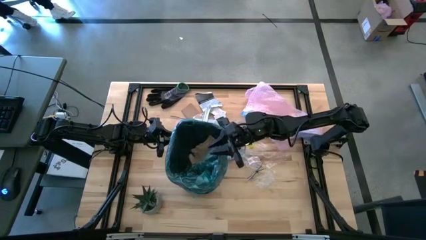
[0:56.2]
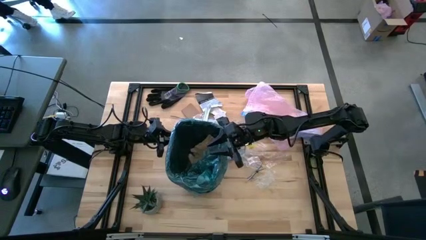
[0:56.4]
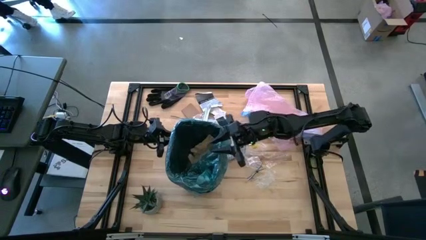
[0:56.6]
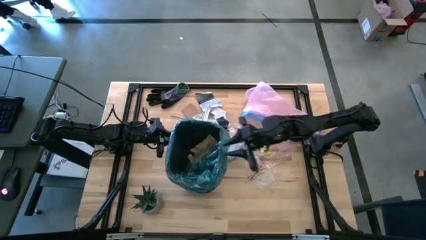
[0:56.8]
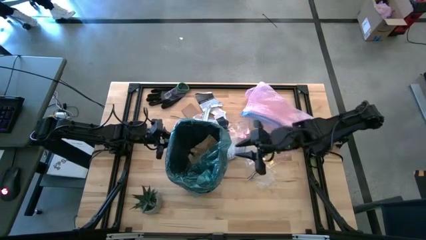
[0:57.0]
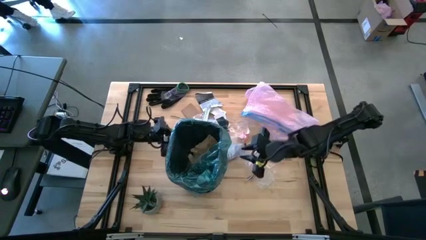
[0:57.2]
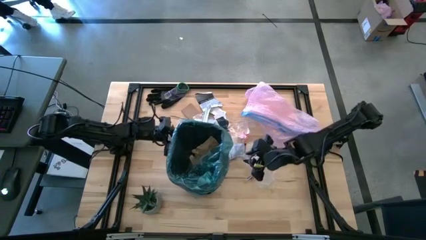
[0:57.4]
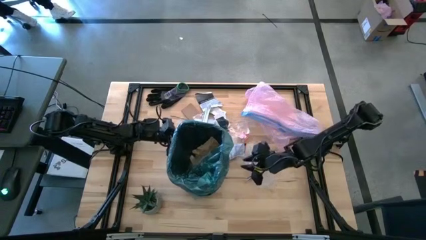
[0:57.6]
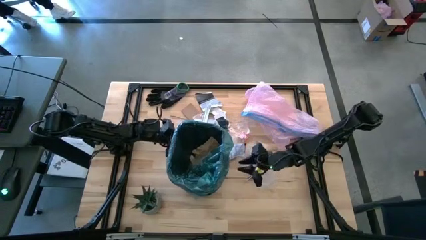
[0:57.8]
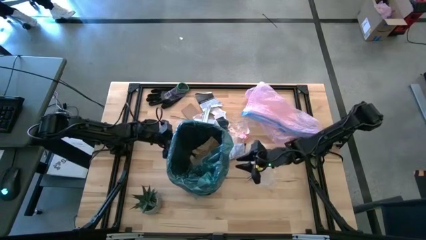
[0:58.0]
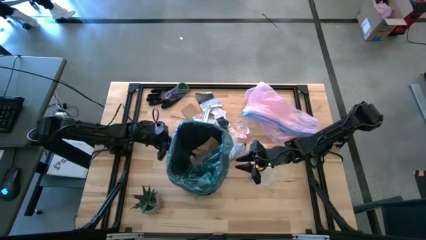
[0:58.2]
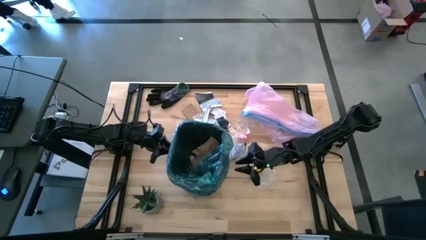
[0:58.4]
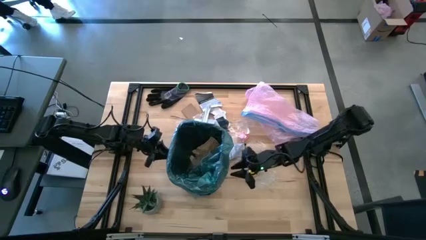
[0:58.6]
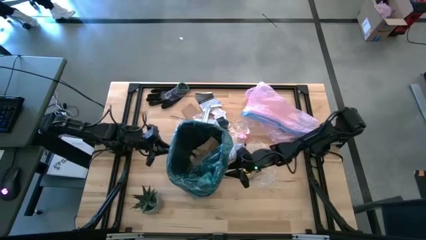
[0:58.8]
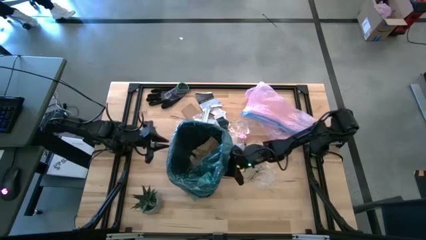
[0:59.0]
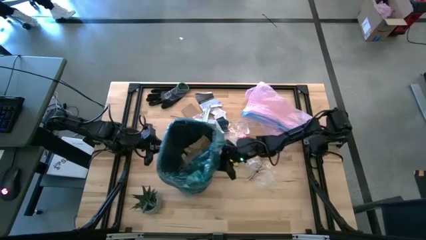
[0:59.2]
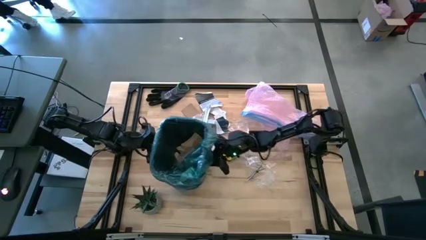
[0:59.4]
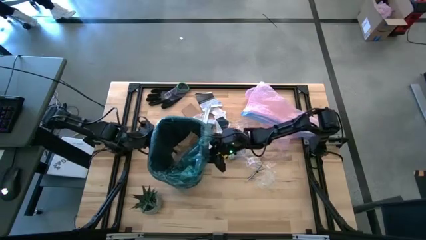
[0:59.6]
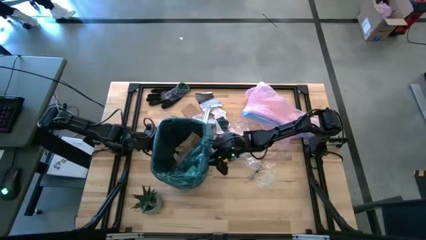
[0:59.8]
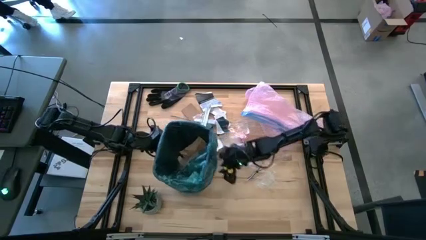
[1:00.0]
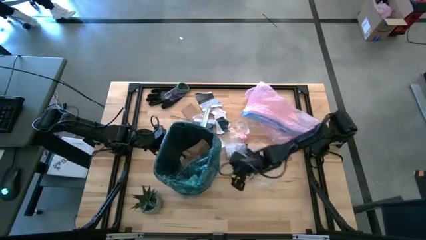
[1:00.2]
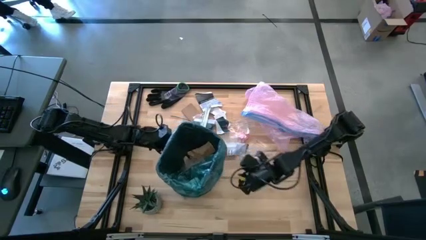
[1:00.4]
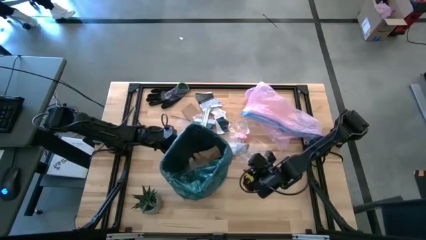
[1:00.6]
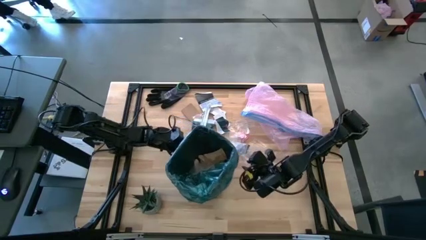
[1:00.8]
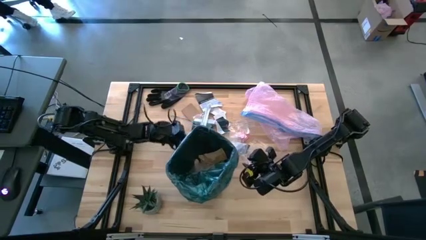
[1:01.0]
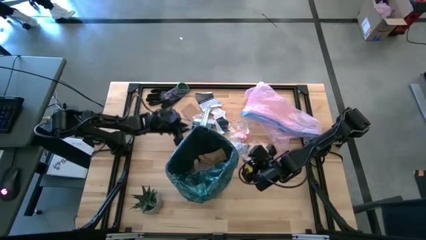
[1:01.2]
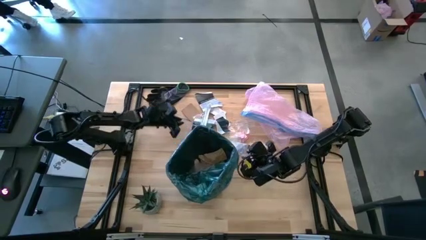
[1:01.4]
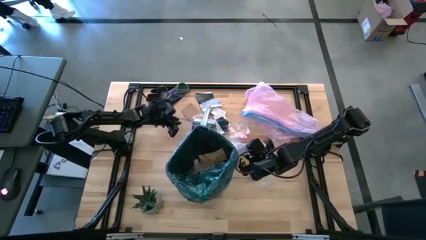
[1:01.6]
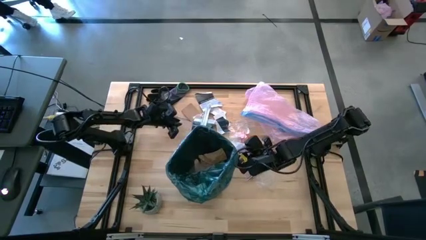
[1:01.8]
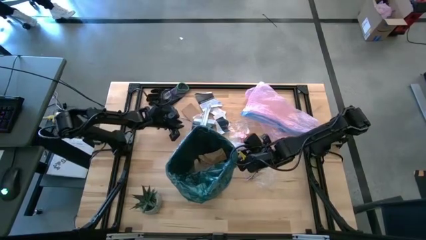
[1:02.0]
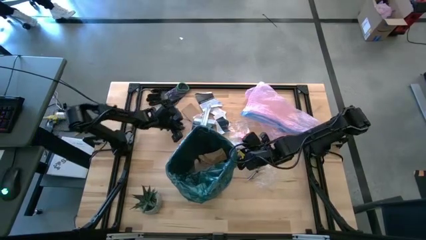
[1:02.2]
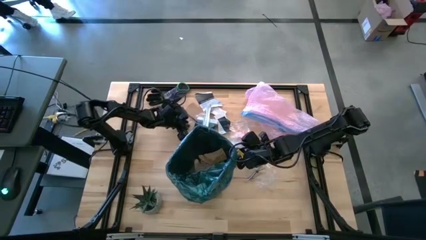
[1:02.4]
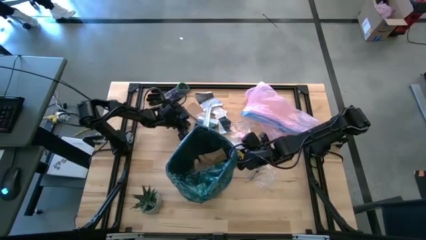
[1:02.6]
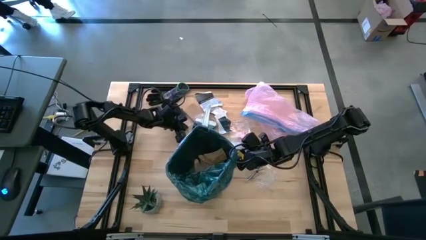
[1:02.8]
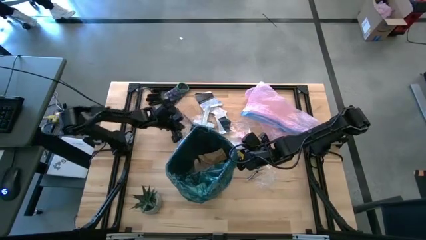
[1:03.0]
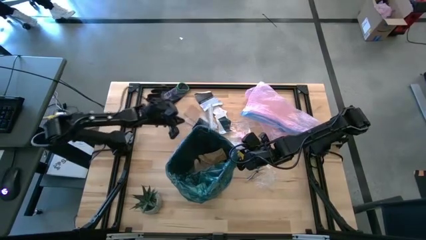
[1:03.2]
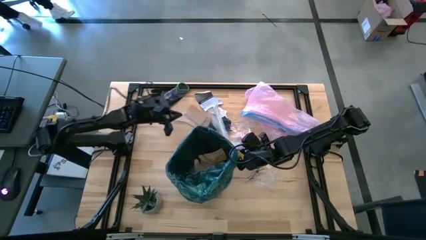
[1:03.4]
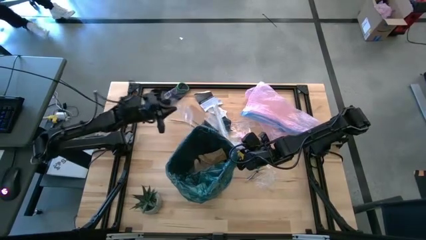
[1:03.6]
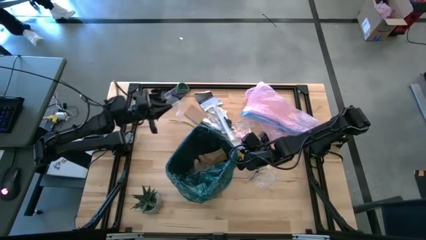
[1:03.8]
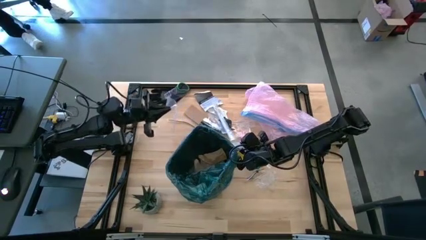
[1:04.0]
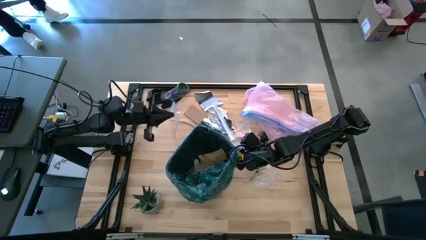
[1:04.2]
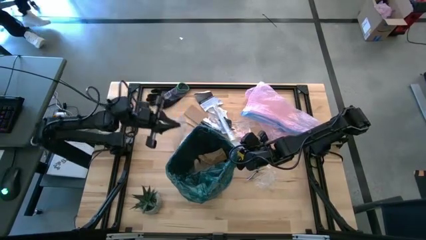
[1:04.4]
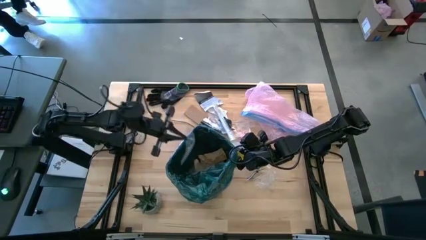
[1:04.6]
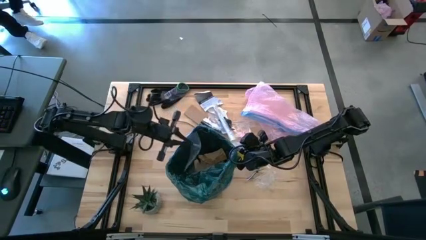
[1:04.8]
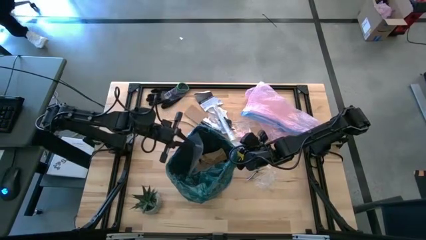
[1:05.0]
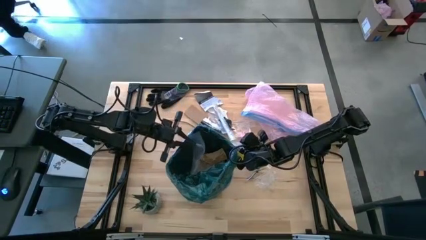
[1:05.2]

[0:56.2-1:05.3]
Task: place trash/remove bag and relplace
Adjust the trash bin

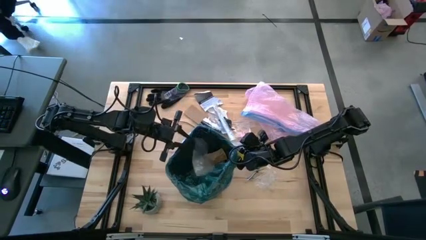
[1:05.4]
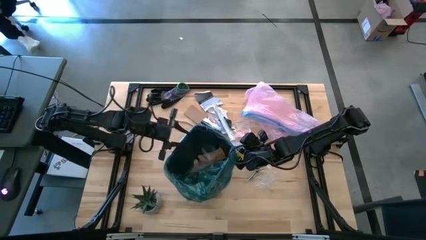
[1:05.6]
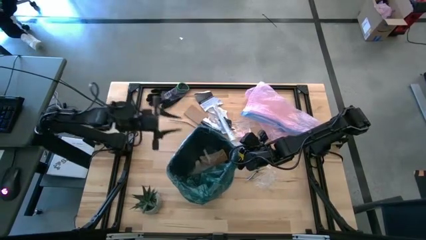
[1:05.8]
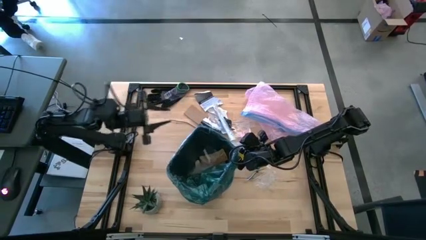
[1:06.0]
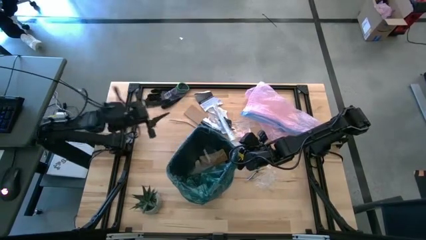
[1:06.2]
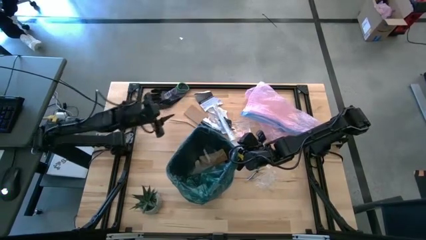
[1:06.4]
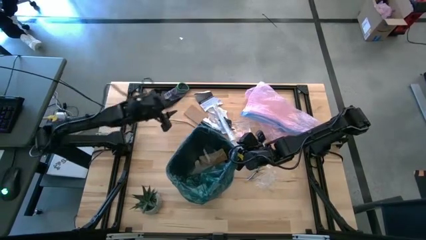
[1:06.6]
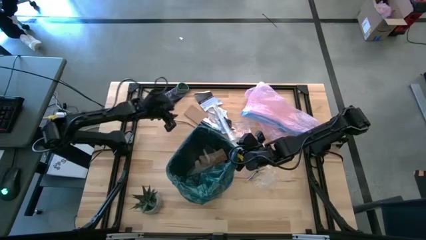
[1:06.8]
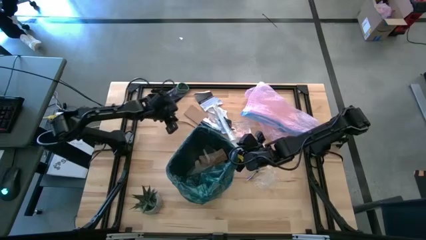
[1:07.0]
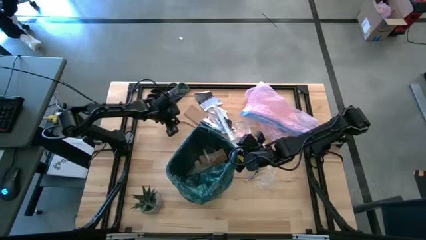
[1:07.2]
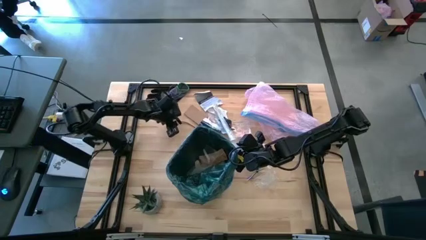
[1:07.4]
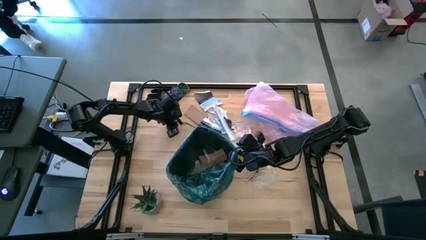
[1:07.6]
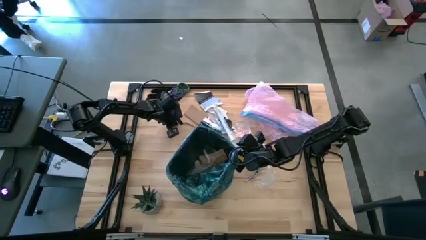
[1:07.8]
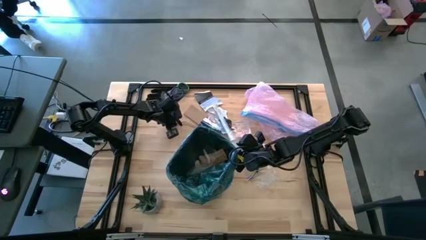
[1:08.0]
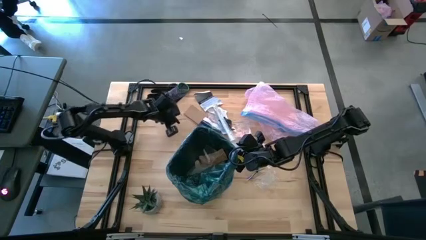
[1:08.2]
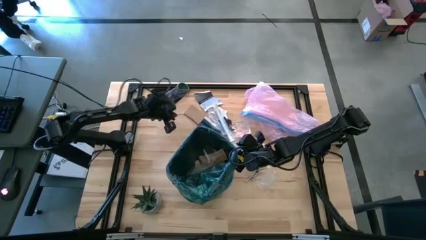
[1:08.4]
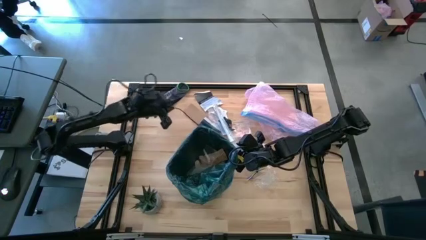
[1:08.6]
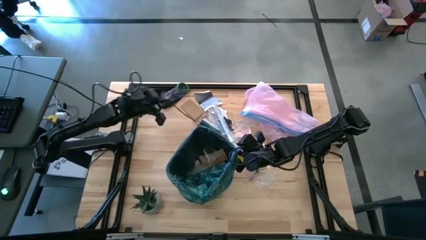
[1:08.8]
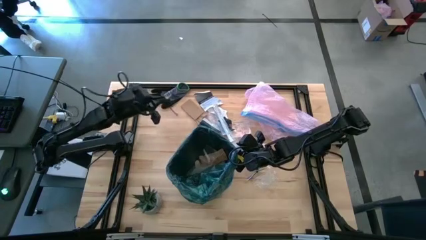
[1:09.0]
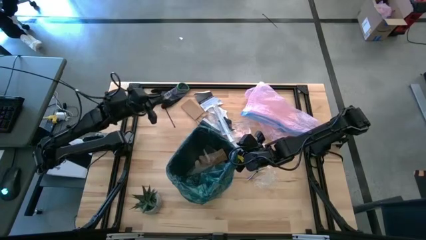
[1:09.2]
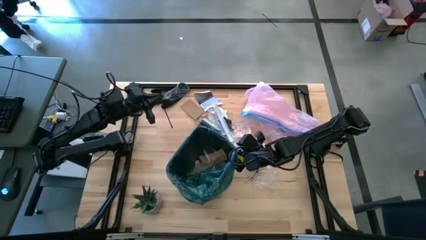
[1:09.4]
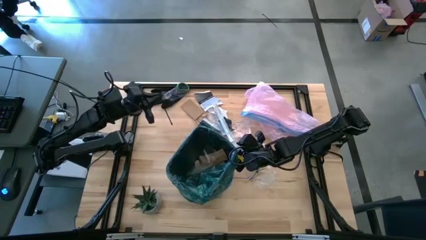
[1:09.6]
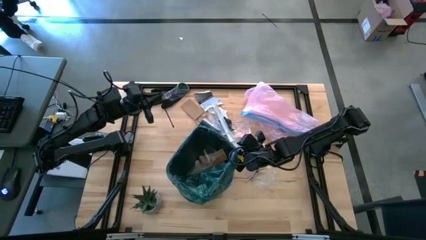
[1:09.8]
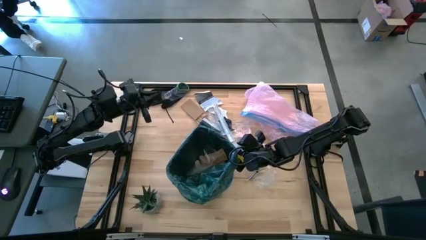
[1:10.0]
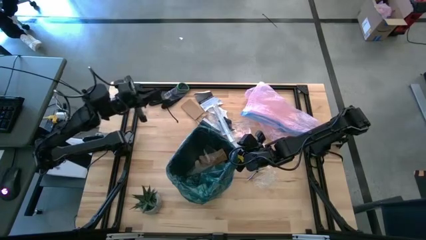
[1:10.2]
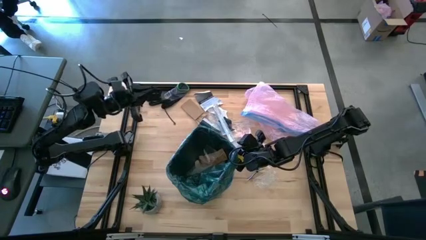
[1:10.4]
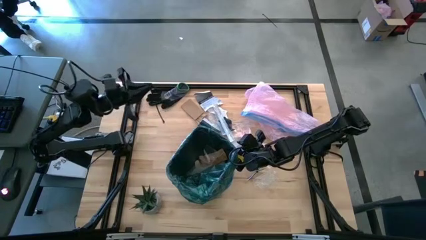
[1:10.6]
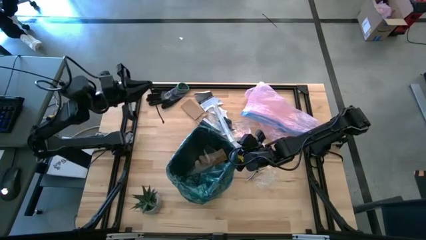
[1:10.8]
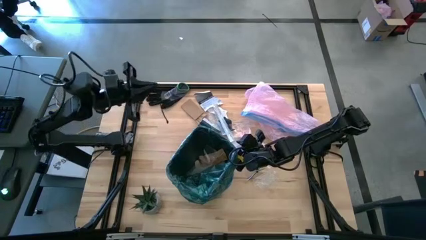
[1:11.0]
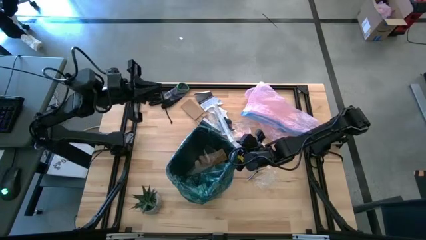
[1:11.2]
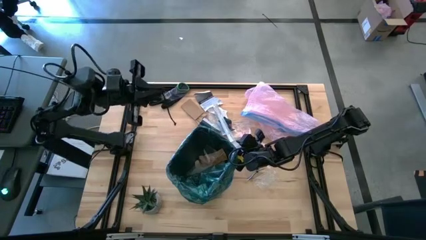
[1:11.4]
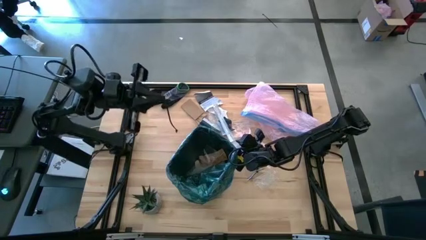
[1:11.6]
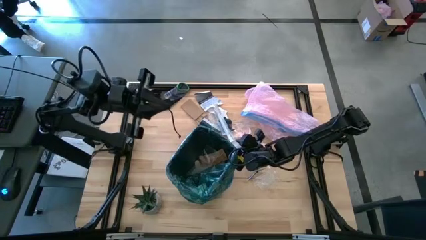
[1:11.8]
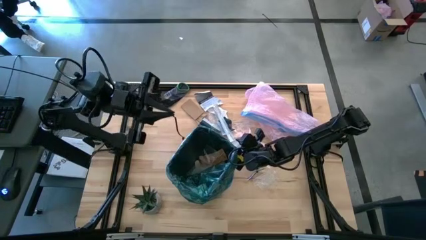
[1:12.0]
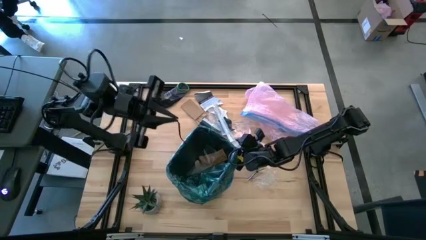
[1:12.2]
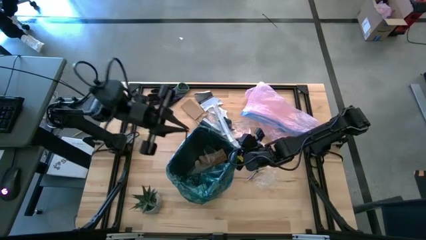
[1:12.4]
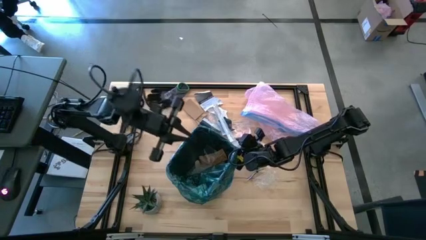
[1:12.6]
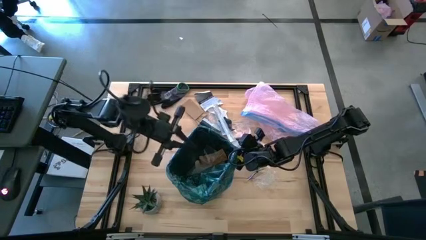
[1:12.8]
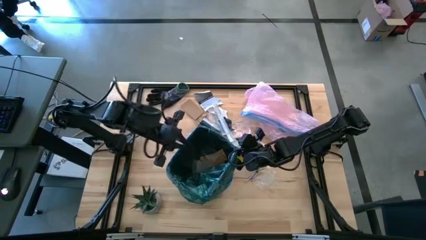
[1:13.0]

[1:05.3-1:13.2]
Put the black zip tie into the trash bin
